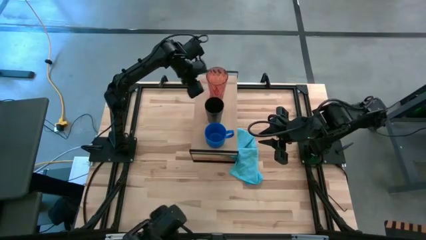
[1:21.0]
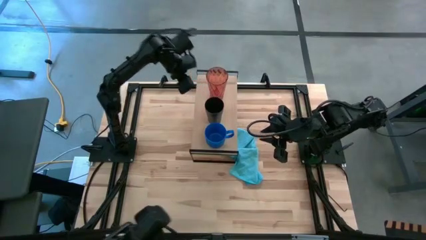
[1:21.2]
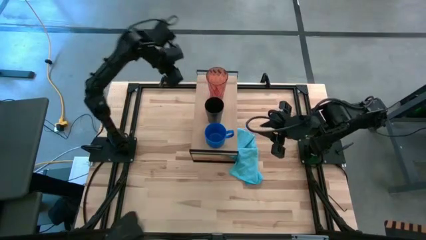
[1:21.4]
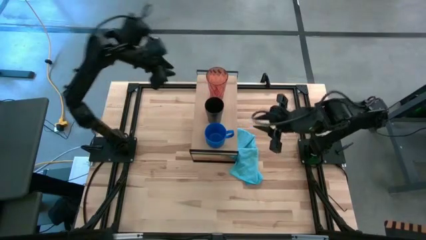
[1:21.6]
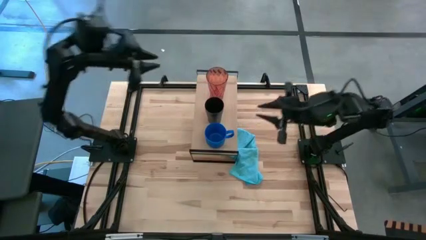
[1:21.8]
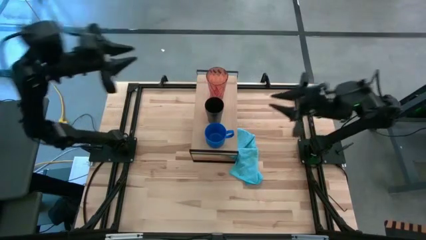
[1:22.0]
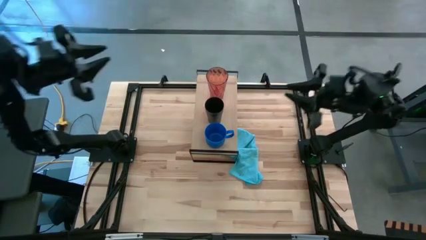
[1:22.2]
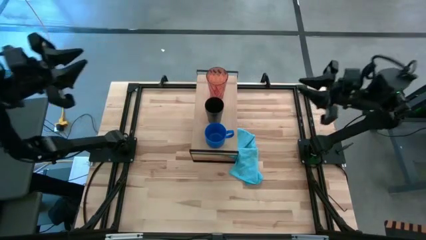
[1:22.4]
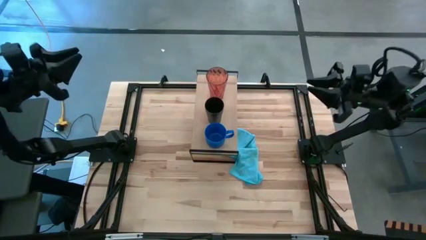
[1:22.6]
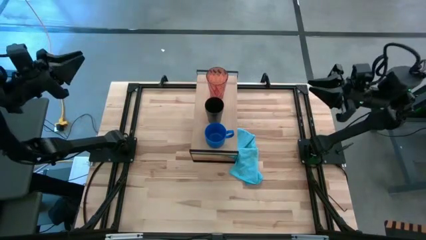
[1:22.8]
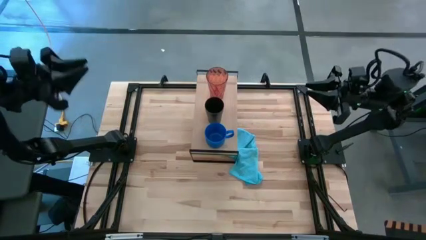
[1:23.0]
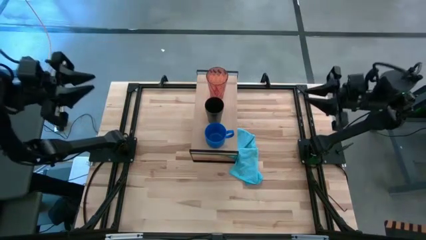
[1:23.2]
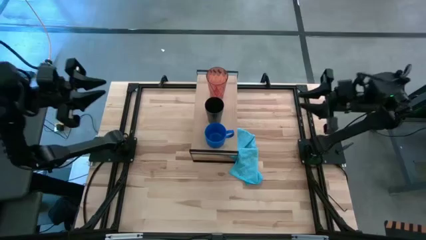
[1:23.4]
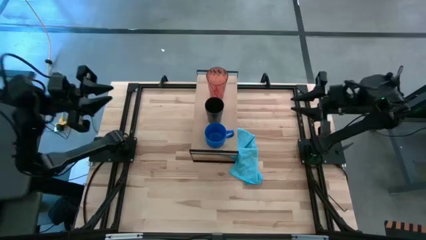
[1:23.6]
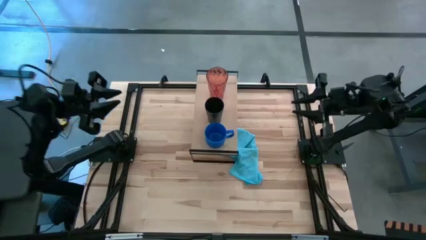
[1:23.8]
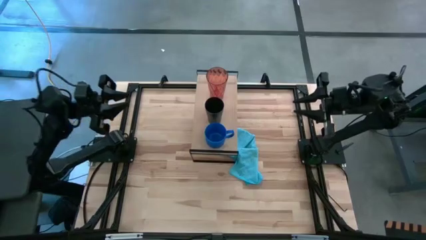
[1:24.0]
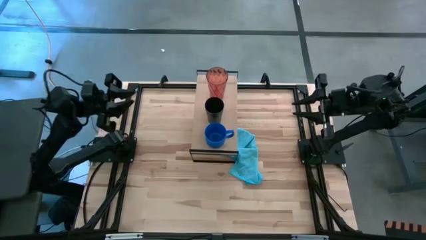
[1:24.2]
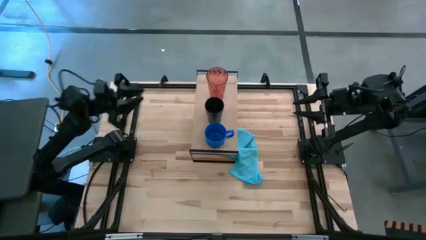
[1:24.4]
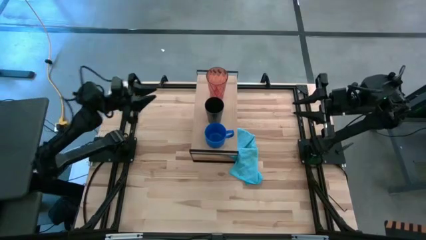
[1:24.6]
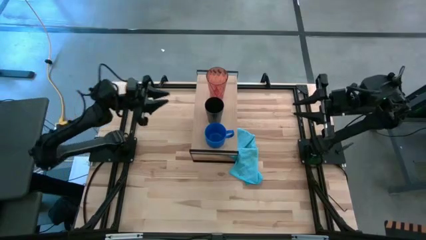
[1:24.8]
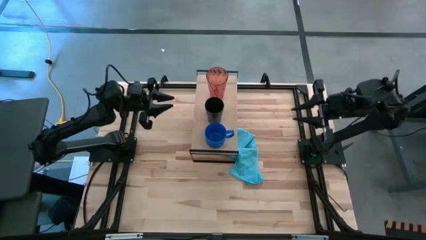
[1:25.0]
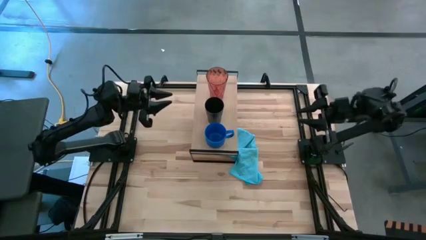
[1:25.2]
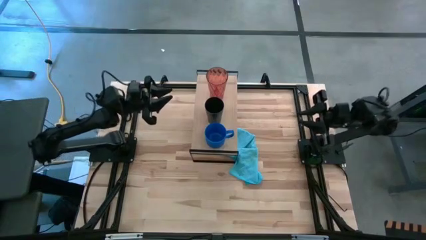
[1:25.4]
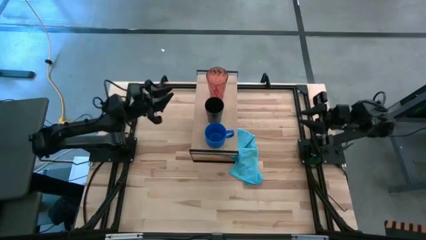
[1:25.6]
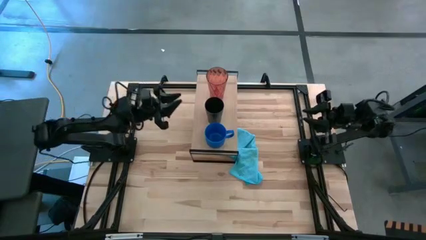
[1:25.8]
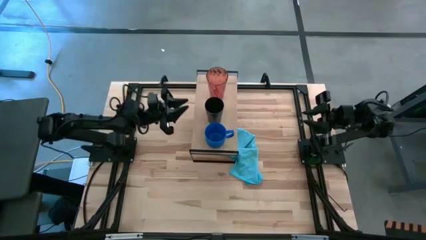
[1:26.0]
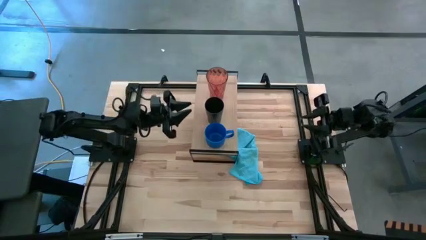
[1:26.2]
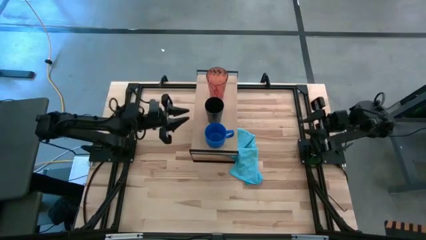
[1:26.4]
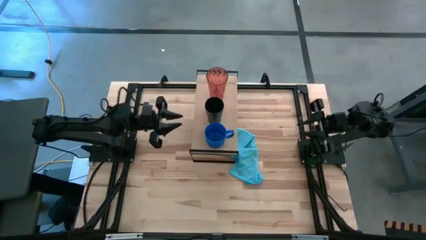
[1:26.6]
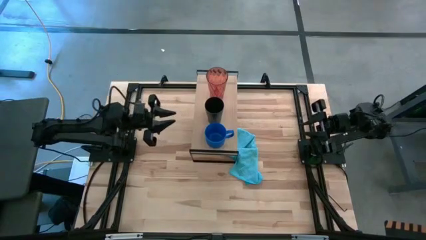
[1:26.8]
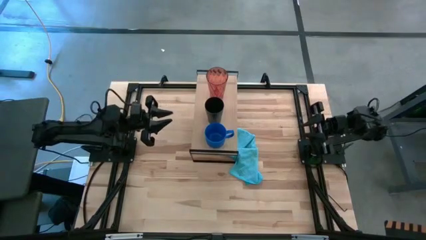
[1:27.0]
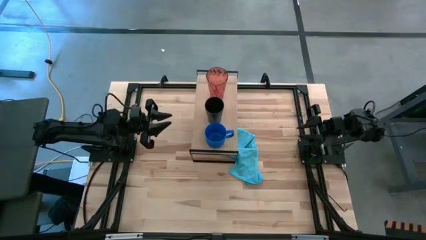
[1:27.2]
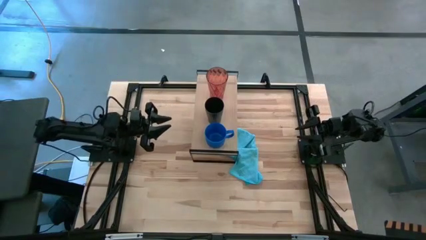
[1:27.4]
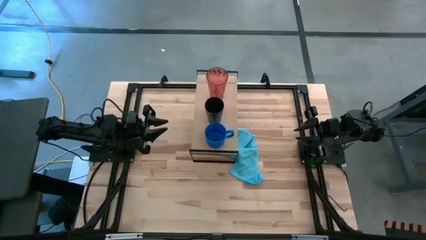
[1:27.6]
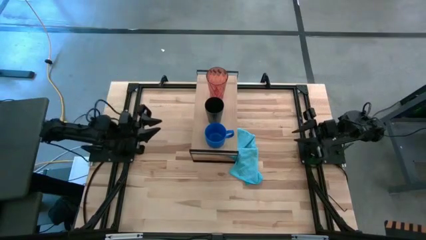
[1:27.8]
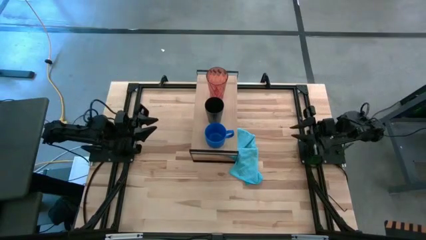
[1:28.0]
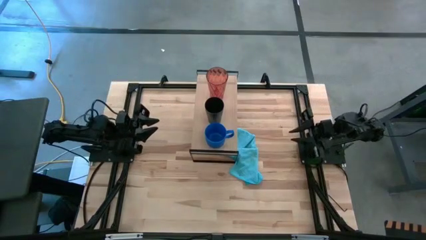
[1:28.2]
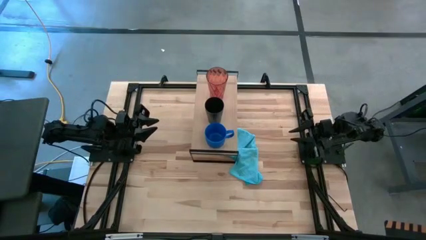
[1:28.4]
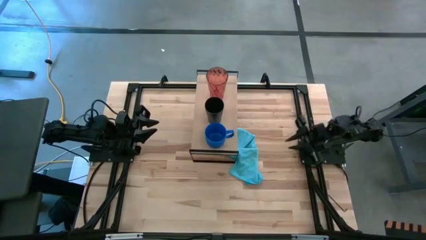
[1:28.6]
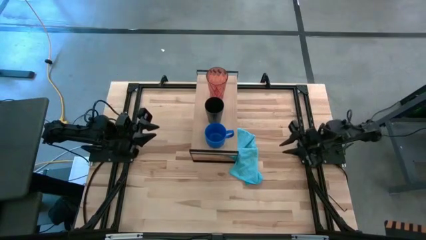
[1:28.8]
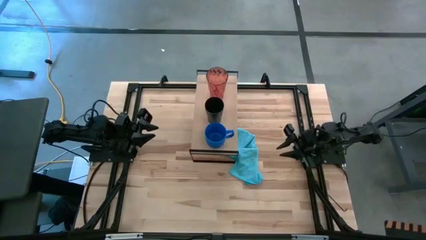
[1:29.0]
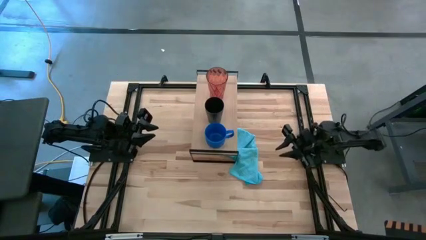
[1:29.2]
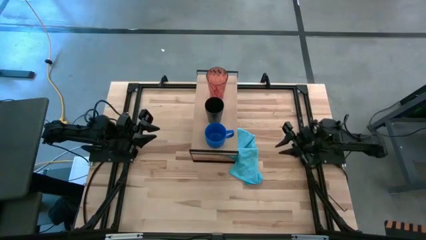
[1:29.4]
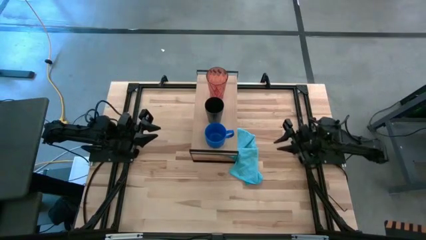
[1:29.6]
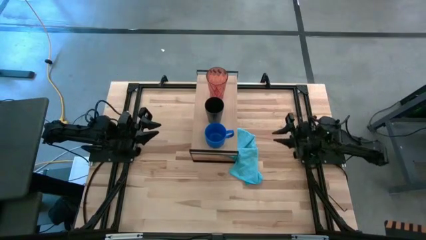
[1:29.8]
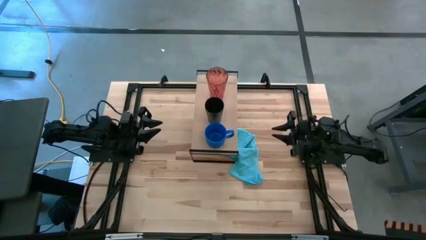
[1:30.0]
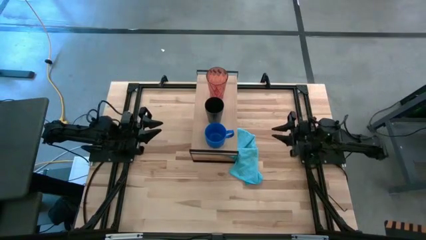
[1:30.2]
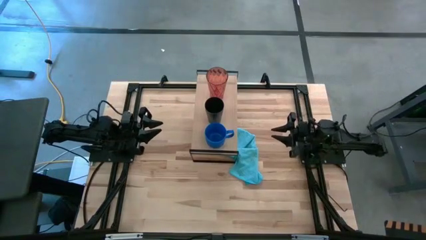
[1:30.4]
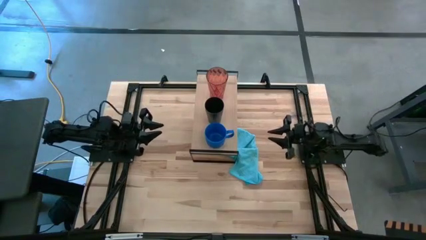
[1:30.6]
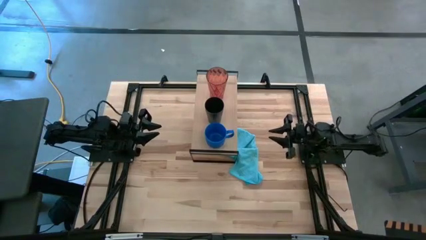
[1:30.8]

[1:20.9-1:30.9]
Task: Stack small to large cups/mugs on shelf
Return to Home Position
